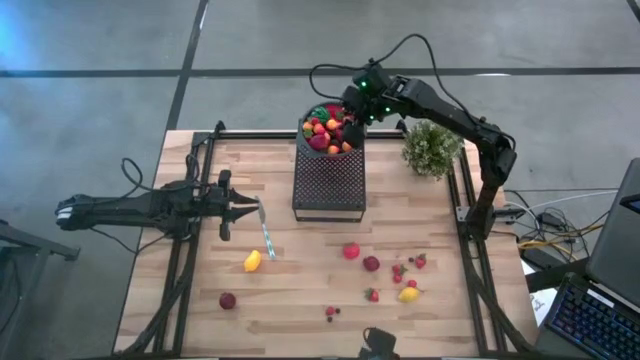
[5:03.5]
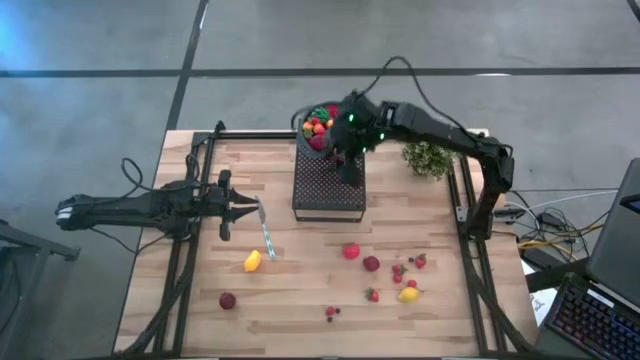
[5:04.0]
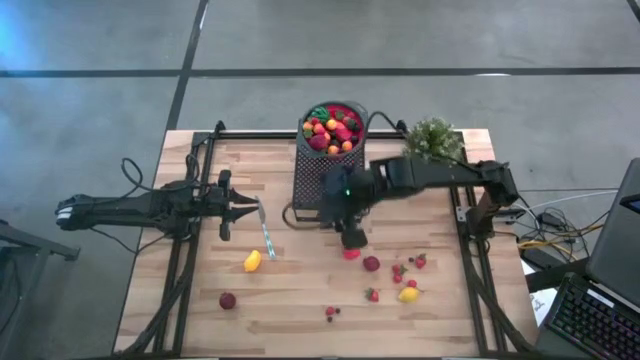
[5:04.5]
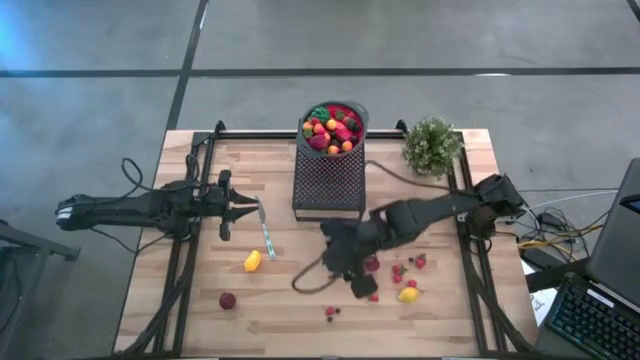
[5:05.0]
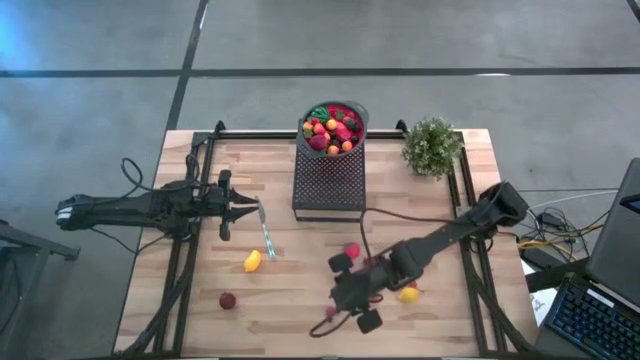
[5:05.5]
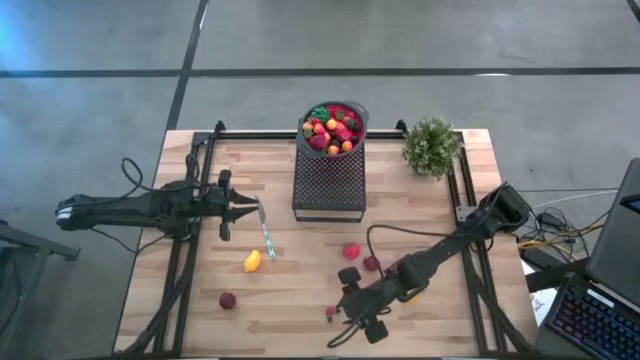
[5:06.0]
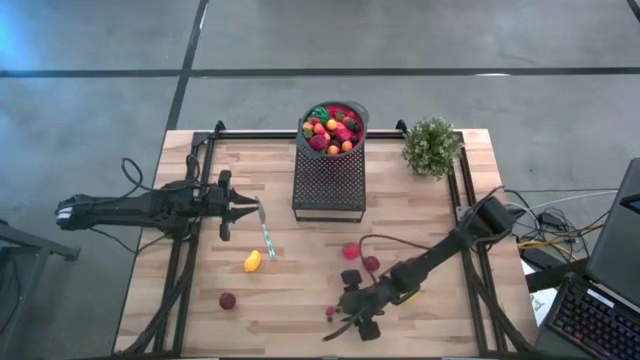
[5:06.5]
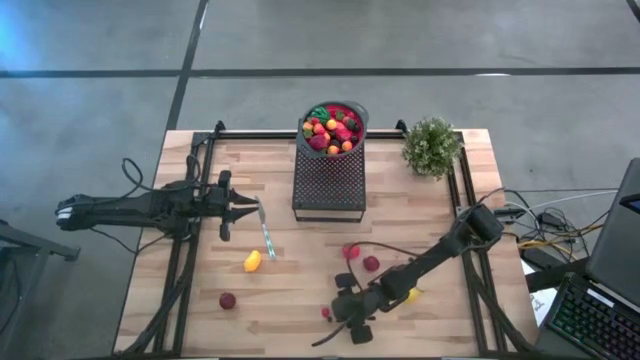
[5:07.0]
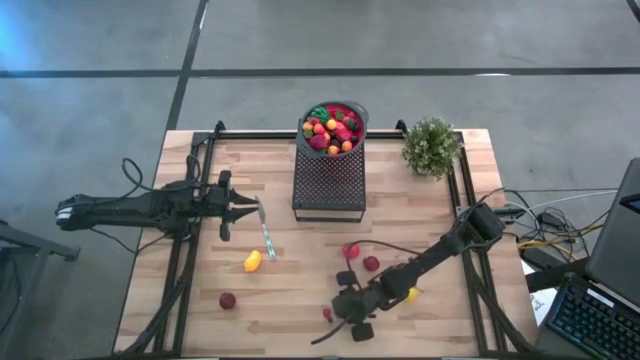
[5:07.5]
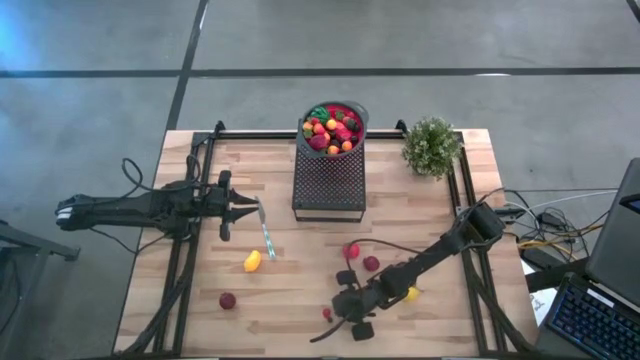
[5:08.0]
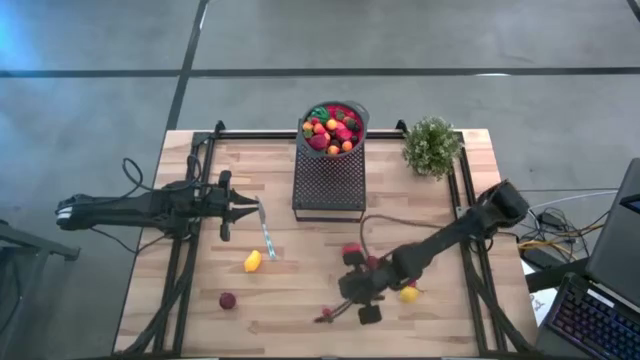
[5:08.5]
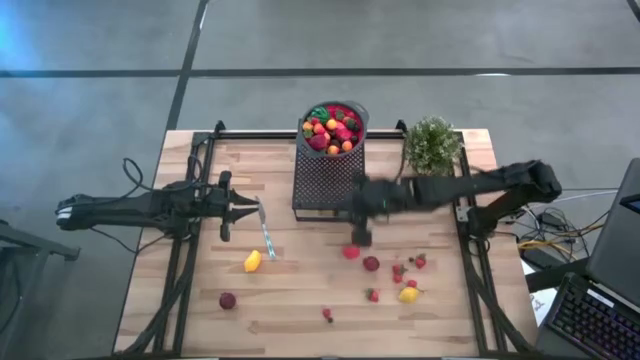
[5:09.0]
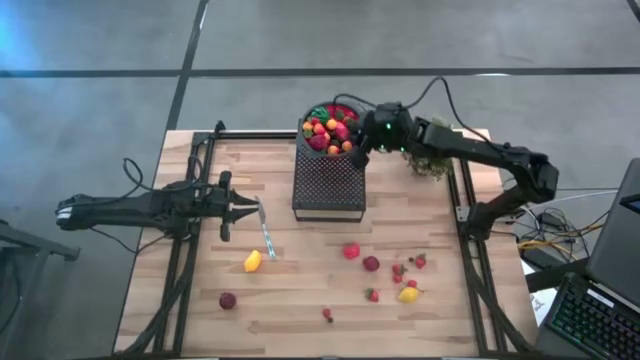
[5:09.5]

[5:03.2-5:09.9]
Task: Pick & Place Fruit
Put the middle blueberry into the strainer bowl on the shelf

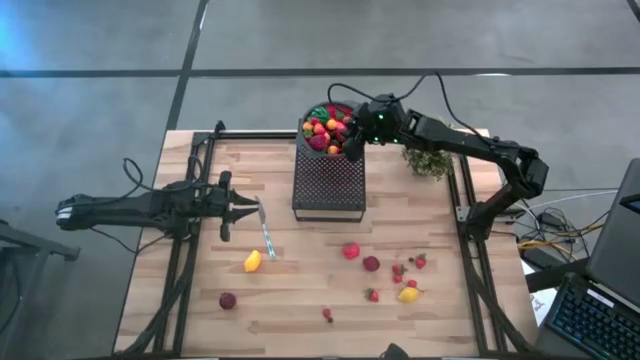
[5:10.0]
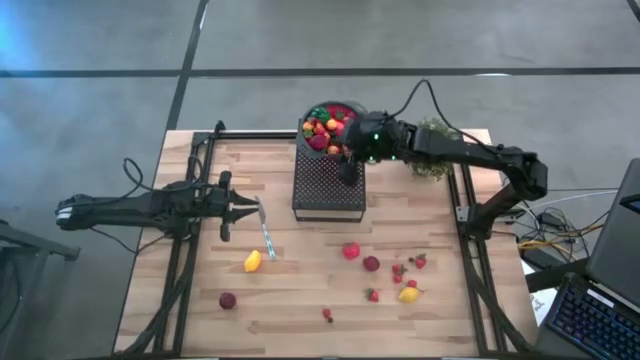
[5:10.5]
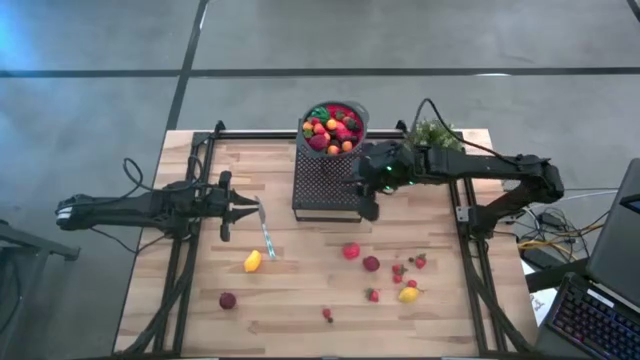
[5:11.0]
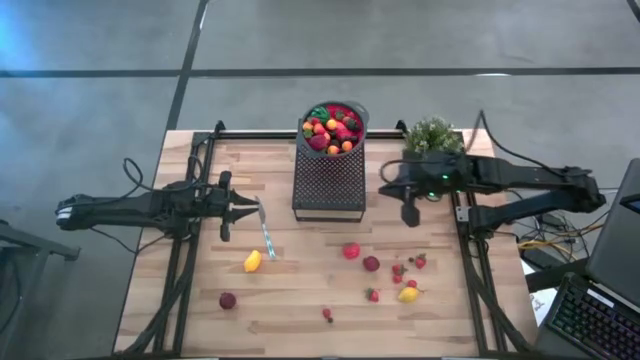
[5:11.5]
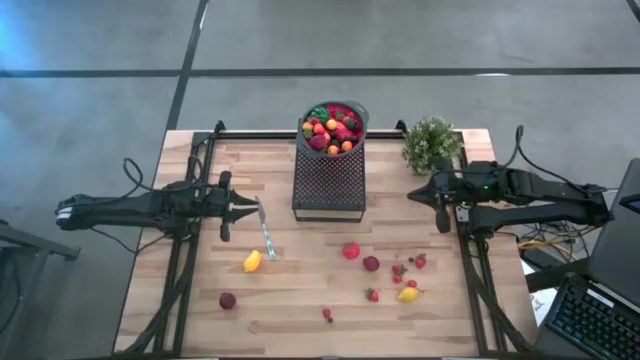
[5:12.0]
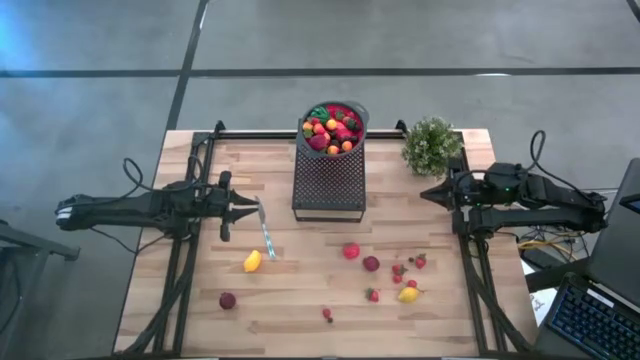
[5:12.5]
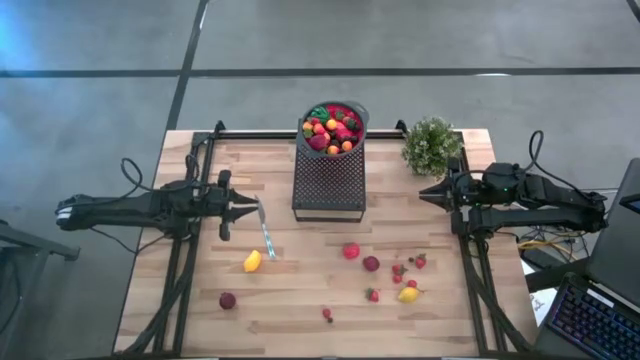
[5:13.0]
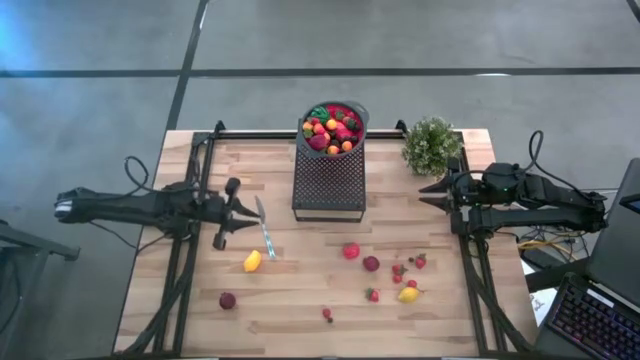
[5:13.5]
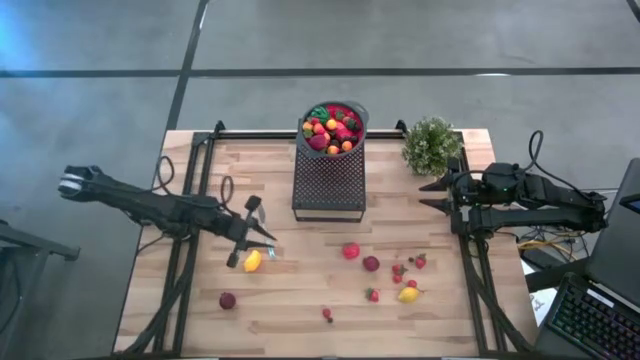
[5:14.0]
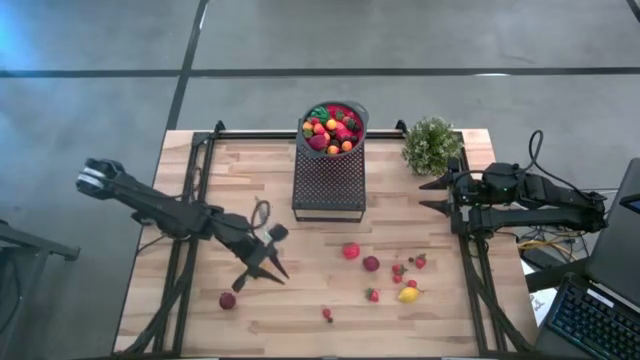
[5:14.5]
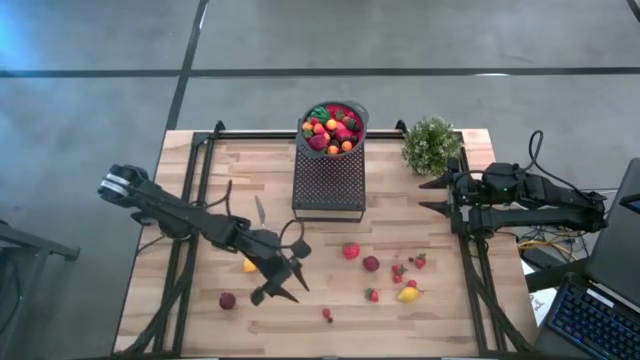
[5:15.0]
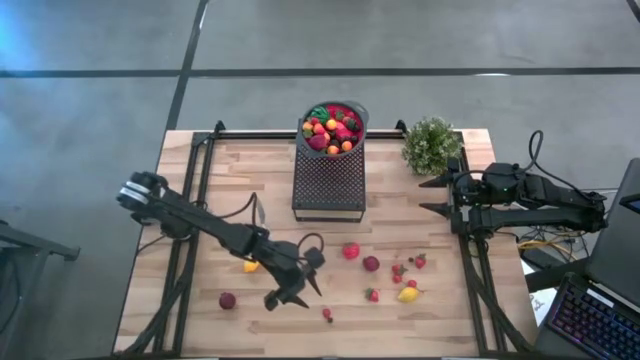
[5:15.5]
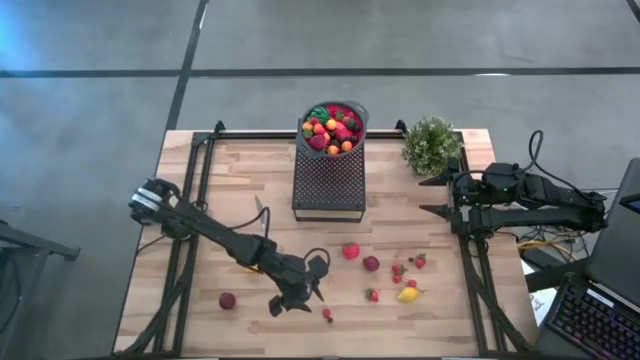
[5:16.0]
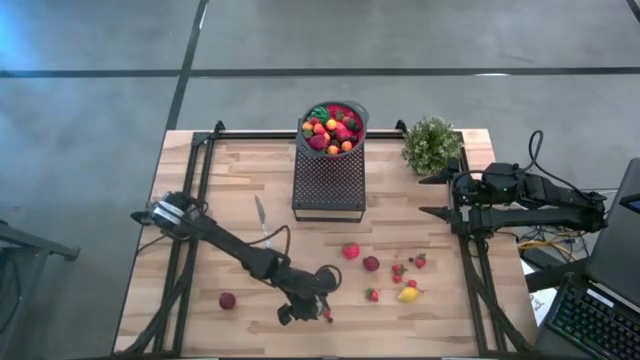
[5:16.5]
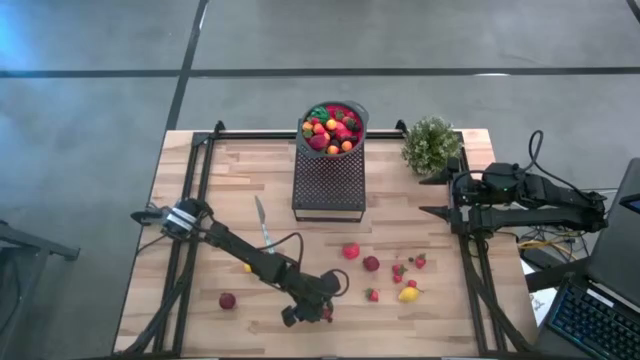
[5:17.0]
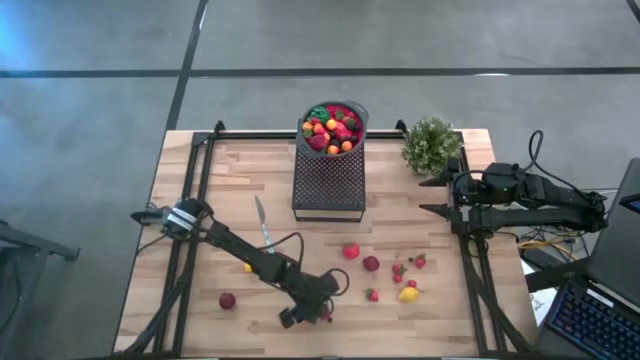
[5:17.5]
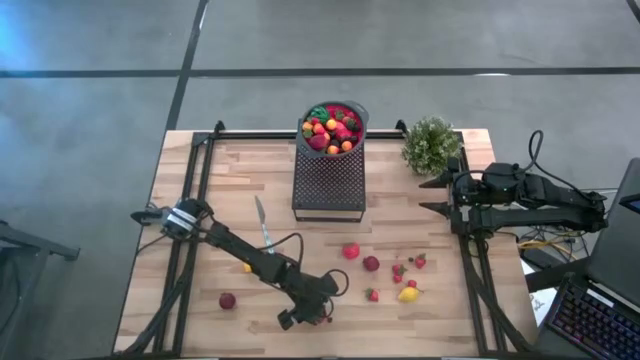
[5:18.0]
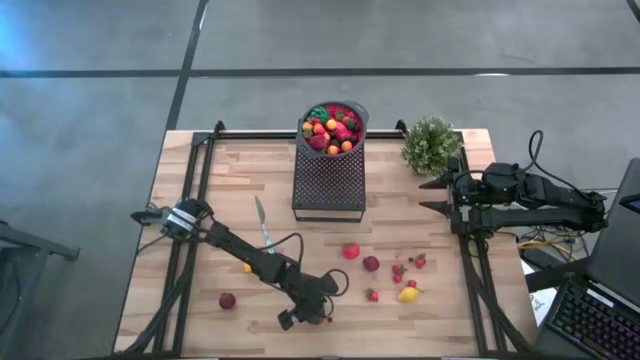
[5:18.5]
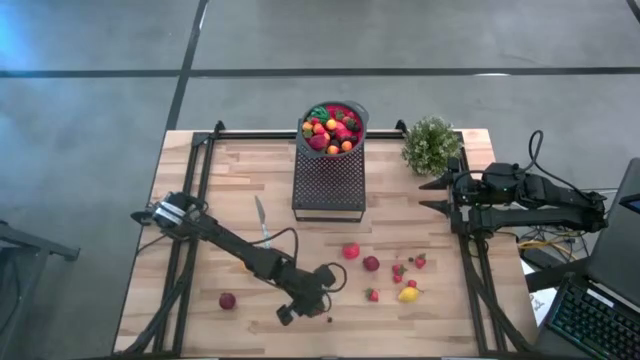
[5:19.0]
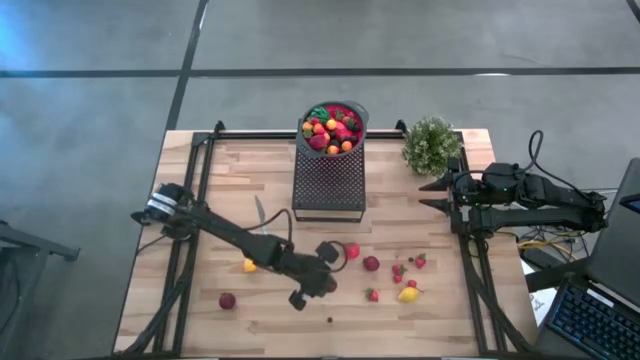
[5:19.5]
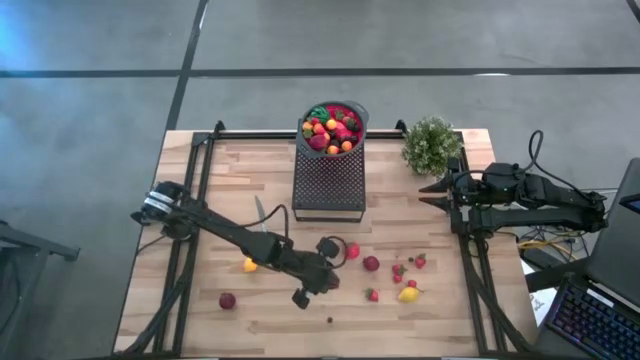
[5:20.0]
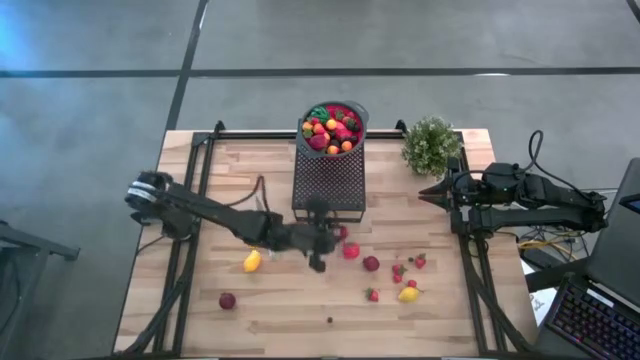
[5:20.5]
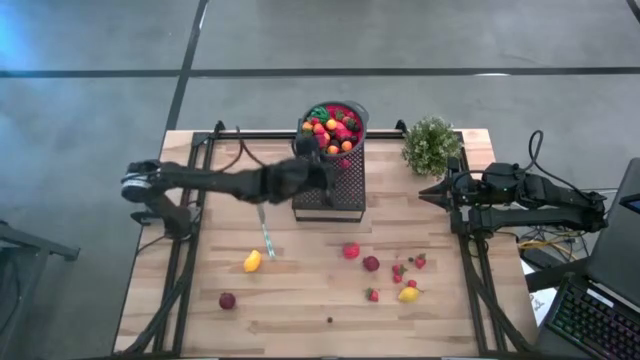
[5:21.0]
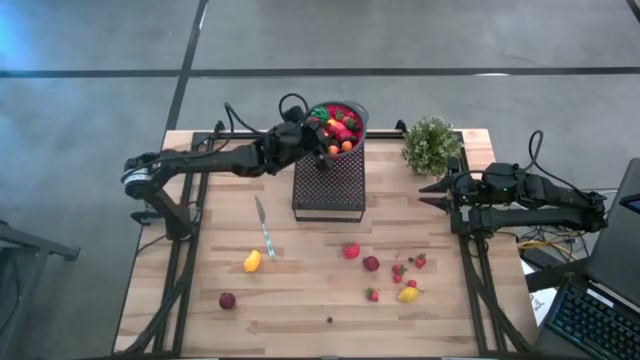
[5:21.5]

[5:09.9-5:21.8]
Put the raspberry into the strainer bowl on the shelf

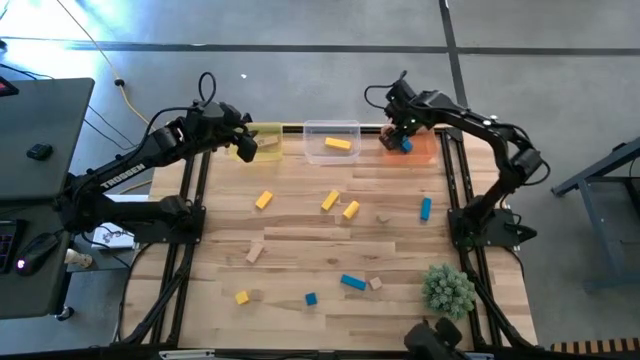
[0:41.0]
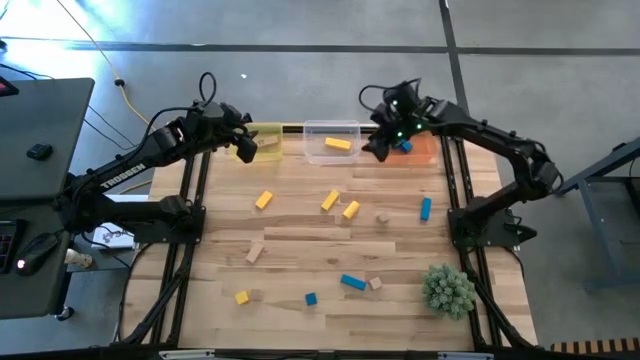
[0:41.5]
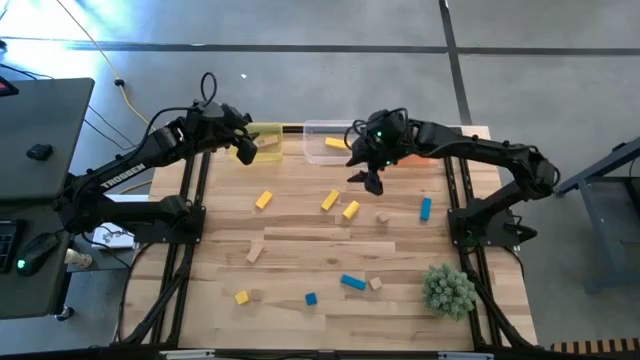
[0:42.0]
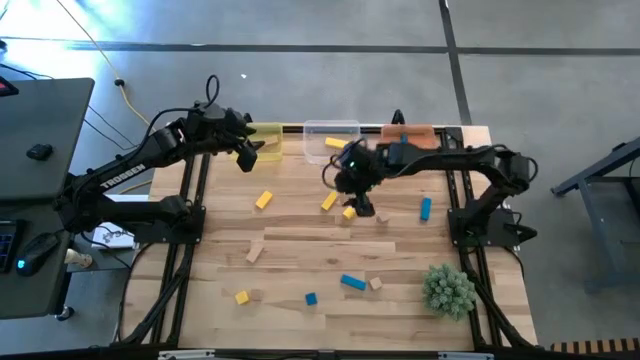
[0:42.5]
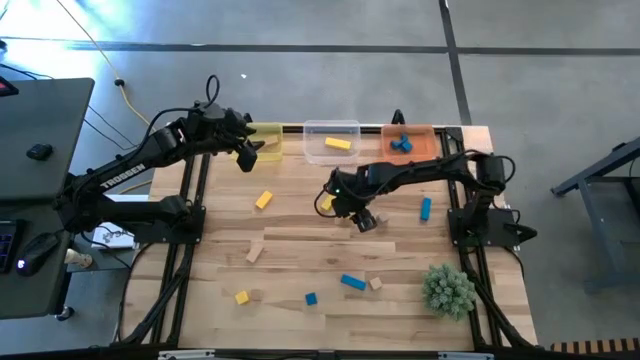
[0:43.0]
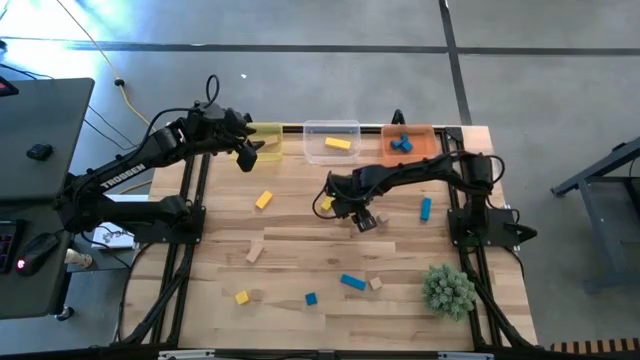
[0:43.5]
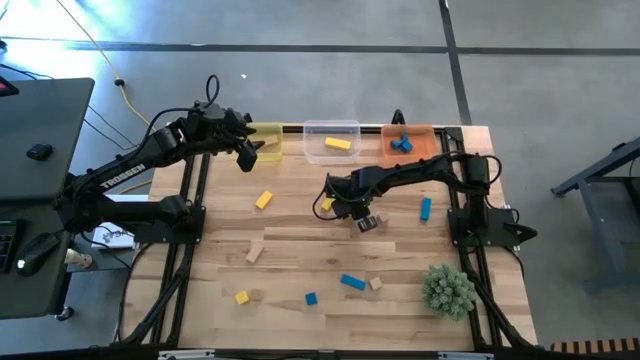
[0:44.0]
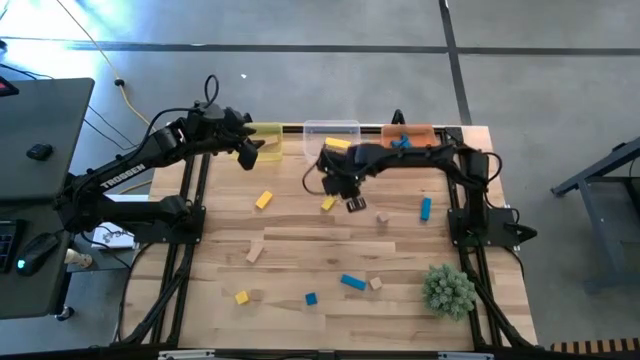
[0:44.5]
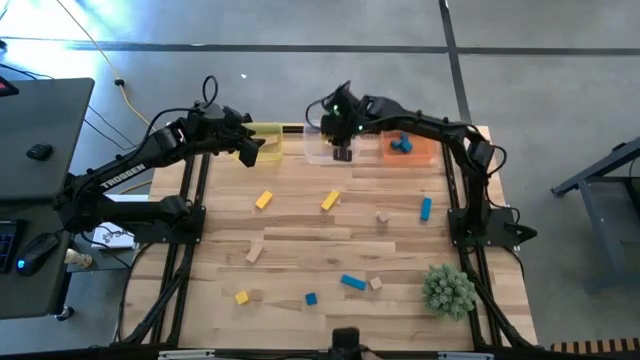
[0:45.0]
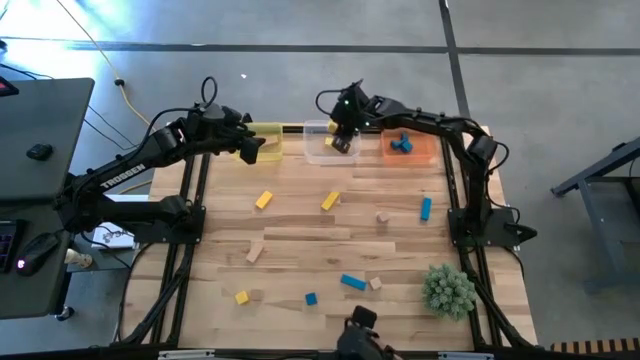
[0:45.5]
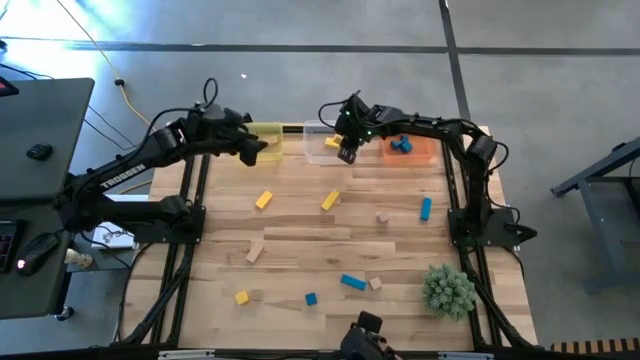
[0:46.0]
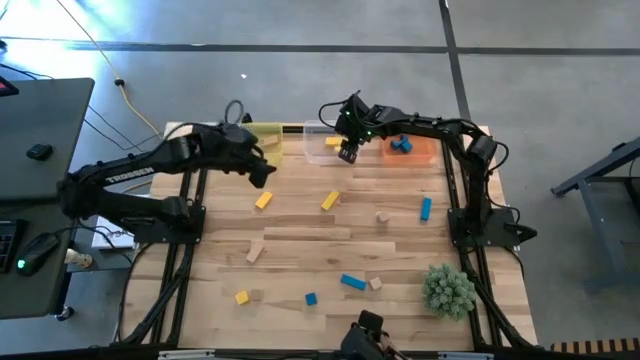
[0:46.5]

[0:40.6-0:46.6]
Task: Sort & place blocks by color
Put the yellow block into the transparent bin
